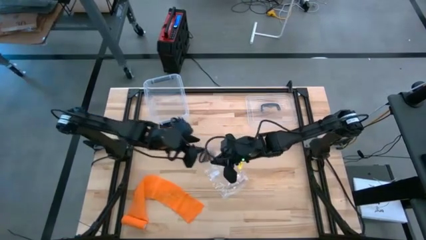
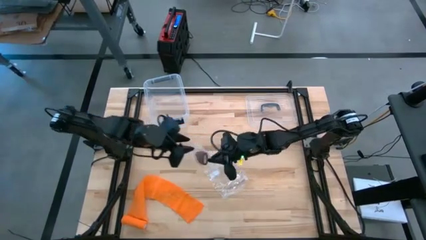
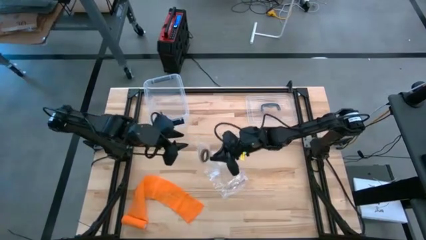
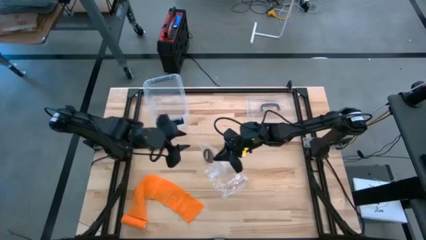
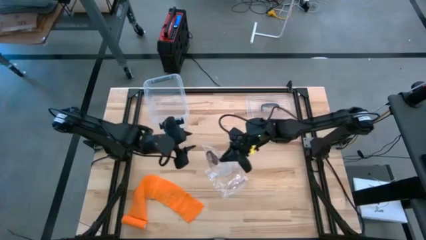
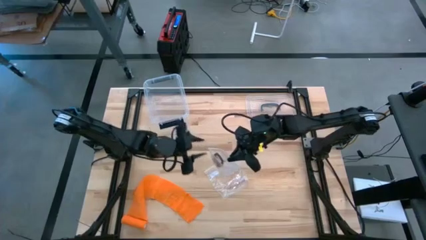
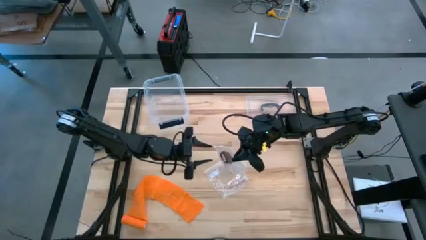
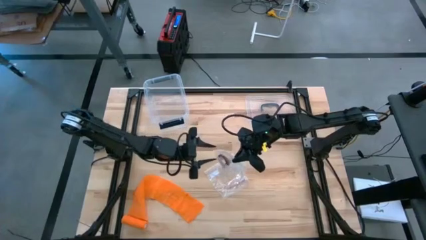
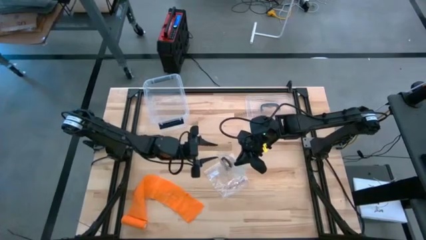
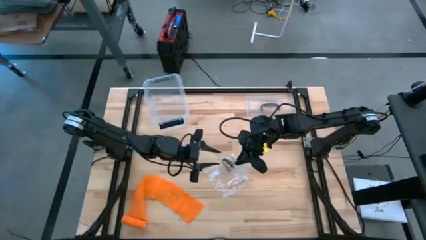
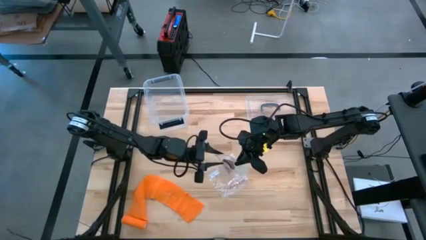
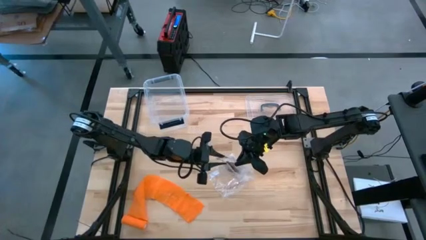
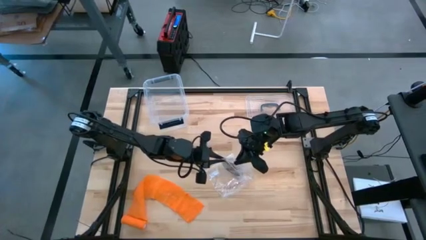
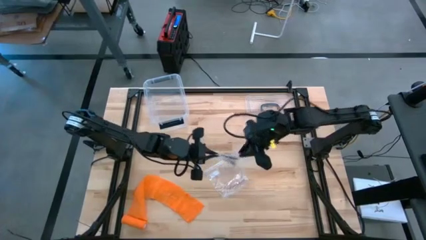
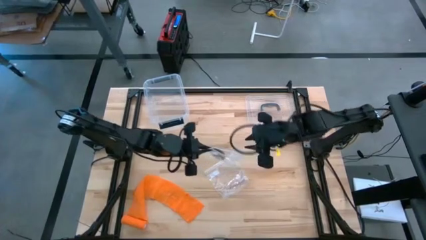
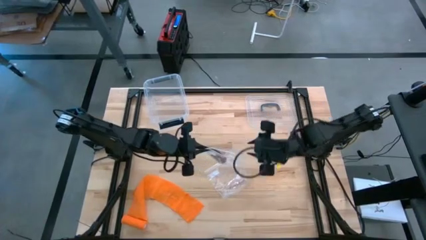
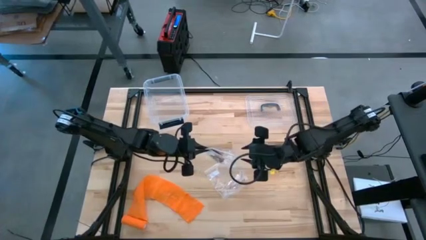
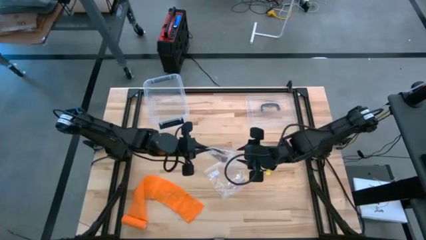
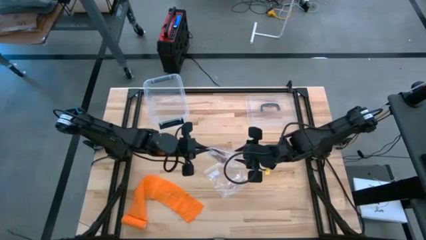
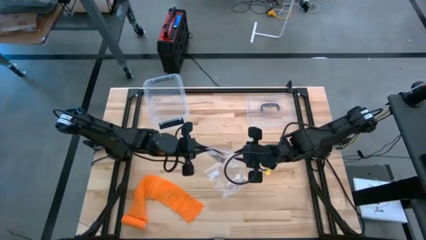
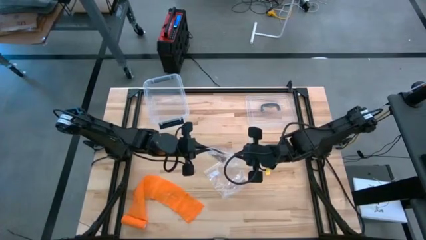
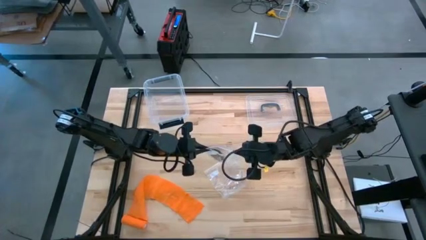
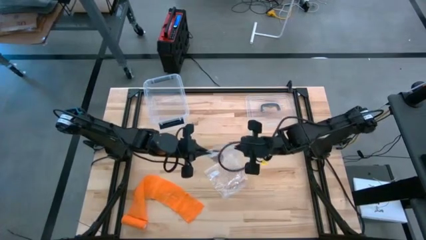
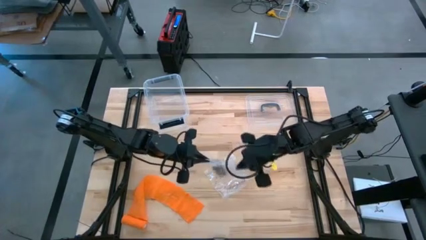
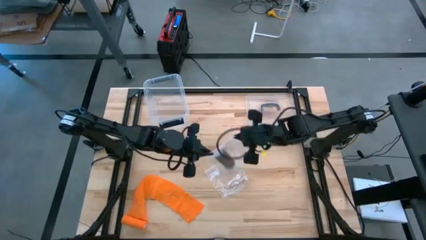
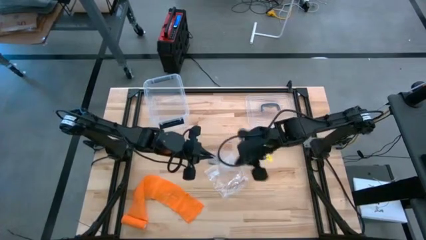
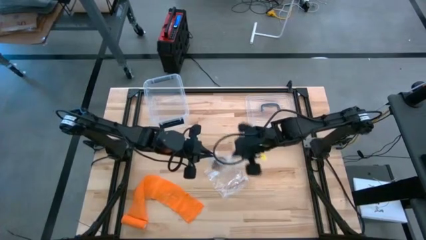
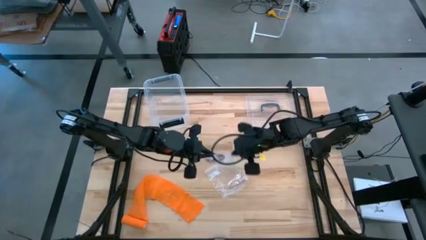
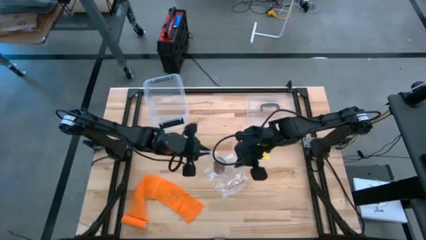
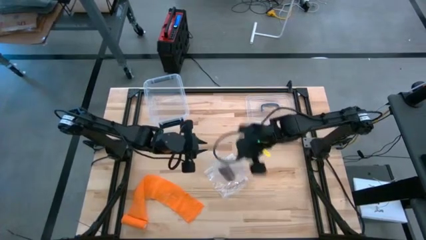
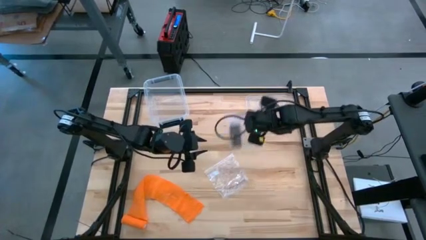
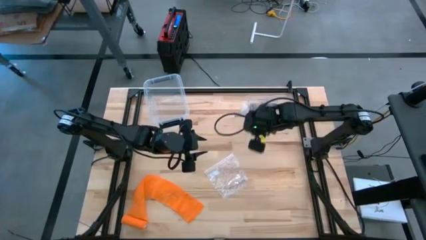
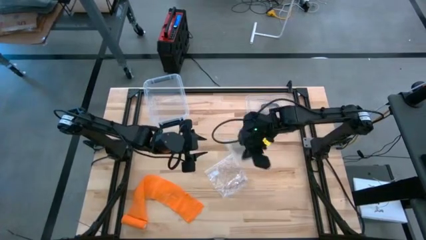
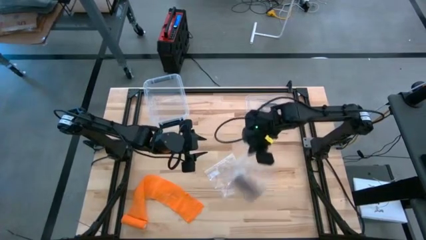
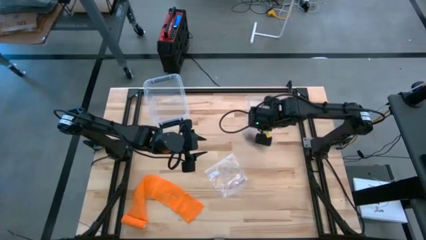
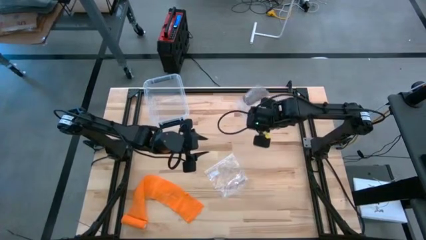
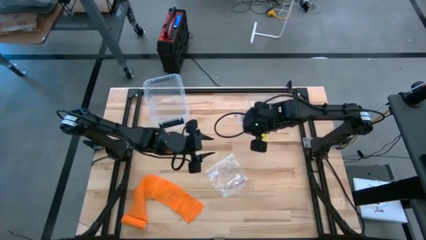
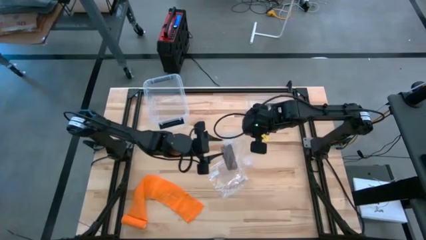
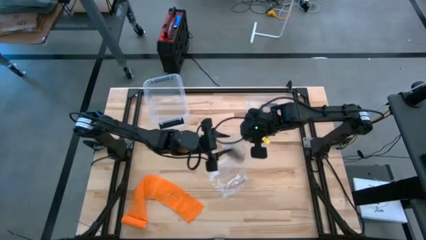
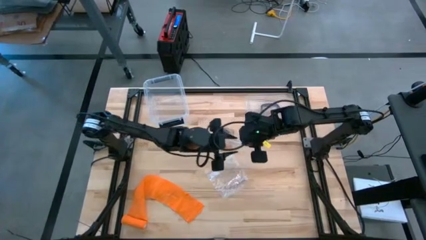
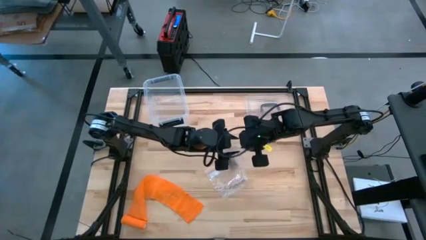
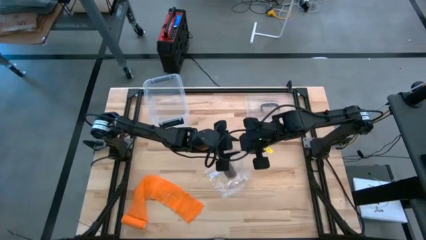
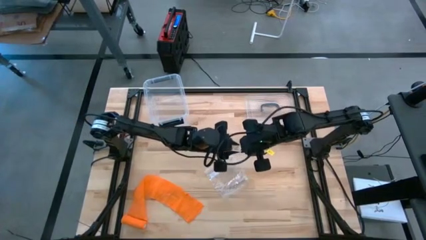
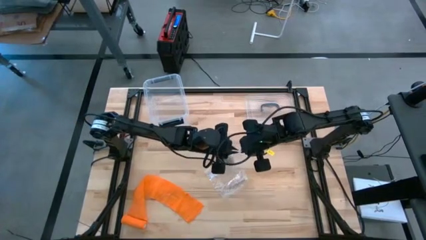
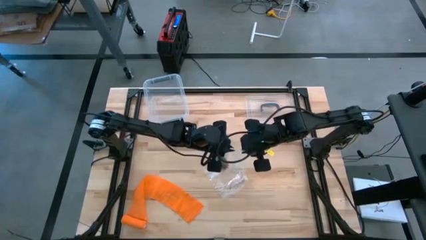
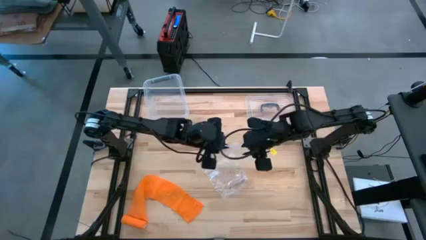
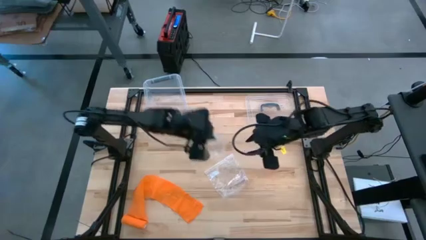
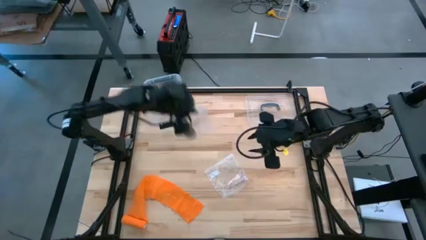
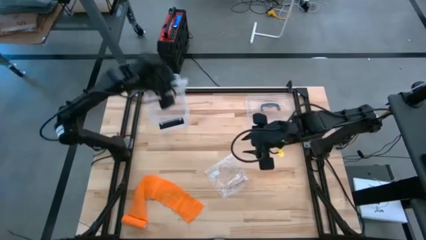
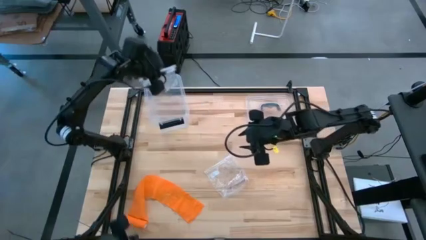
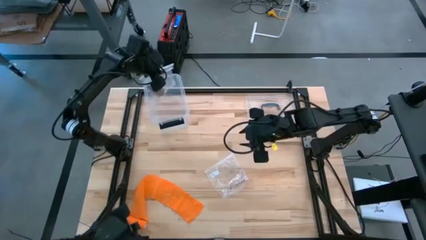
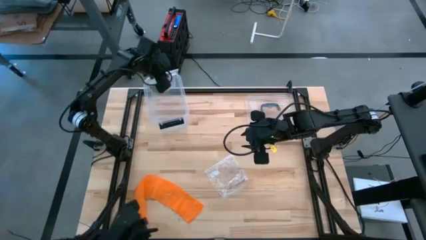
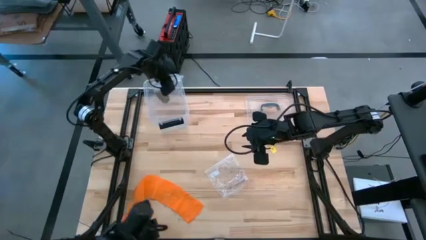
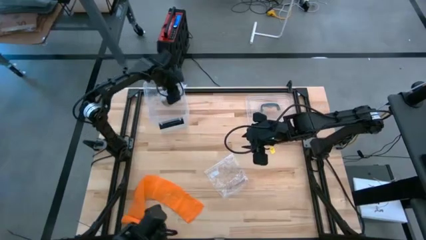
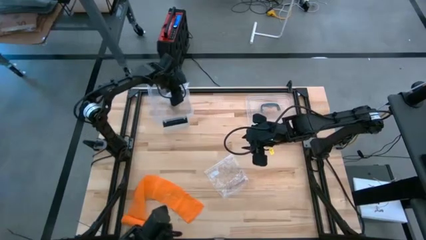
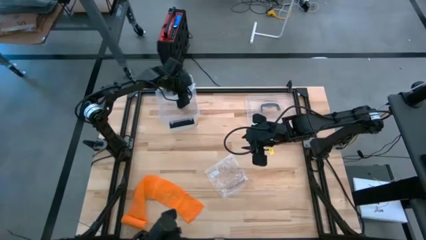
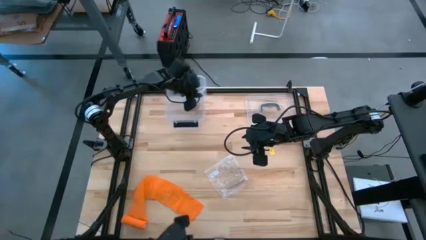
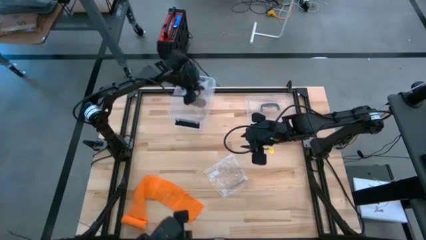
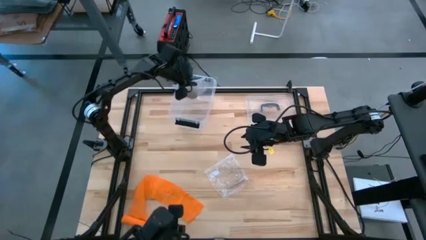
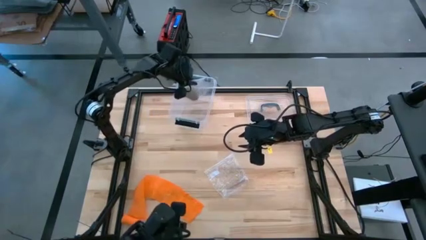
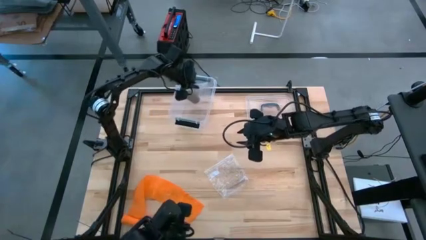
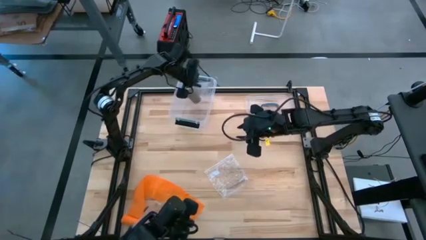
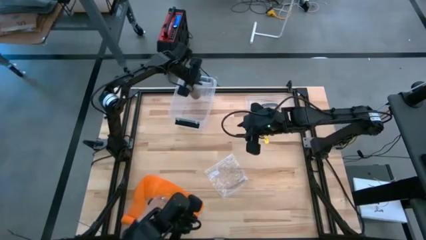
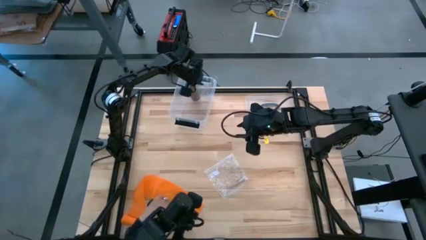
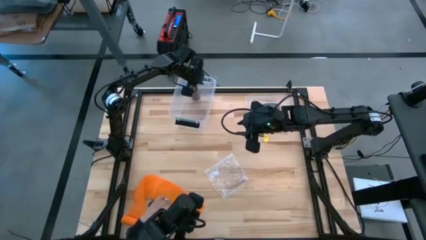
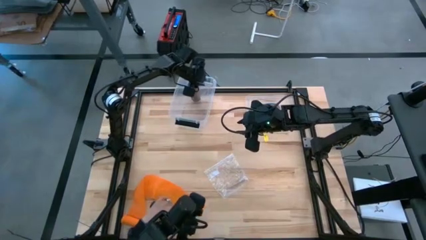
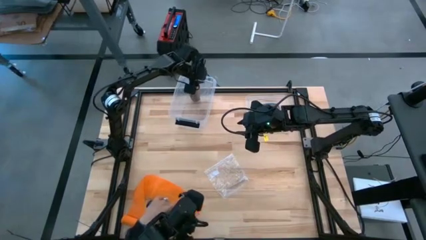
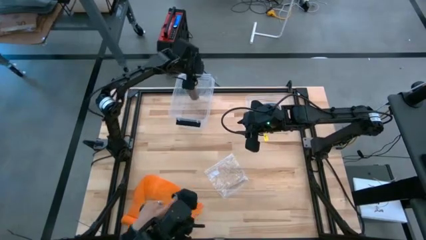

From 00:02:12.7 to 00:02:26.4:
Task: Roll bandage
Put the transparent zip bag with rolled brown bandage into the transparent container

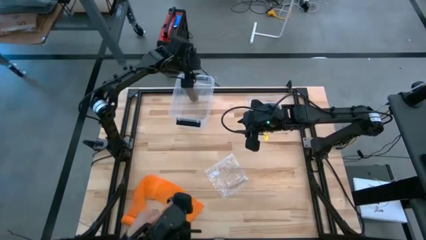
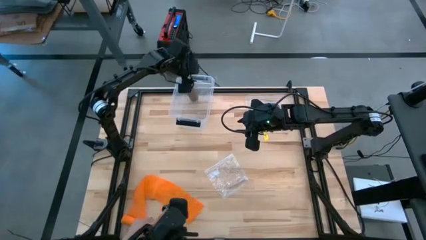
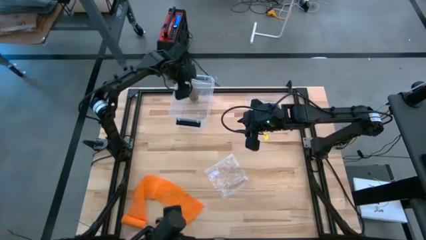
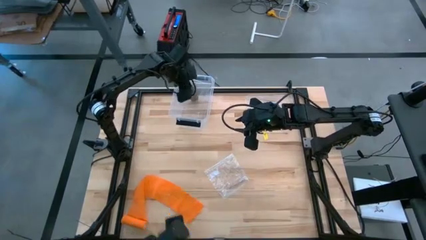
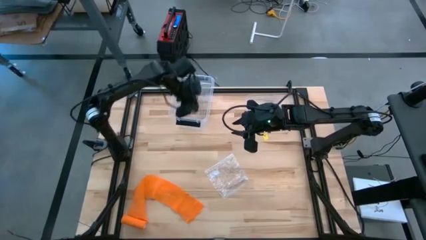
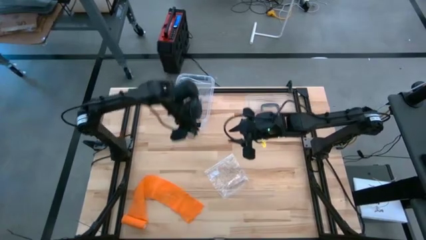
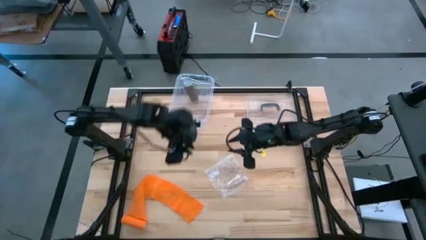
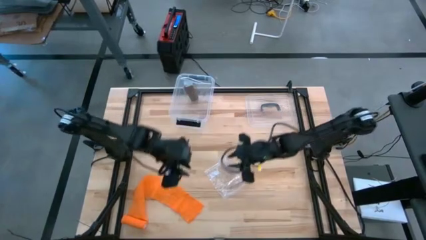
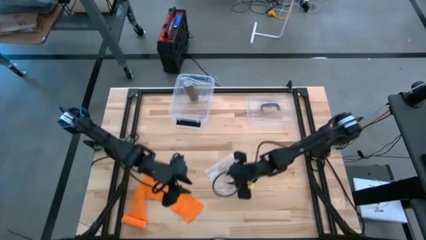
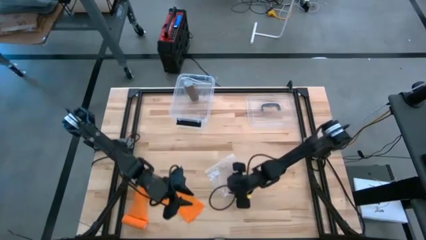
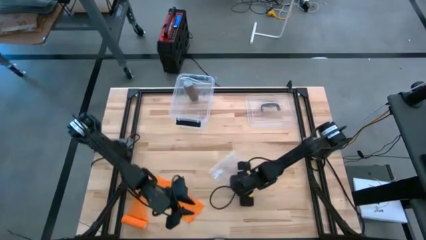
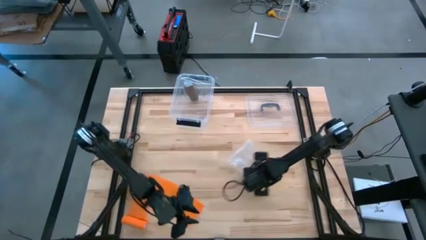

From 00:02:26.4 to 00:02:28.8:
Move the transparent zip bag towards the right side of the table
